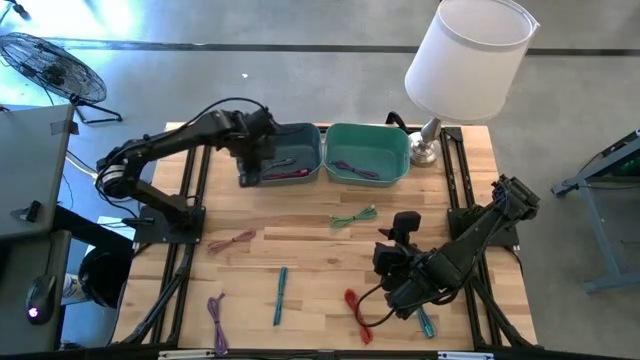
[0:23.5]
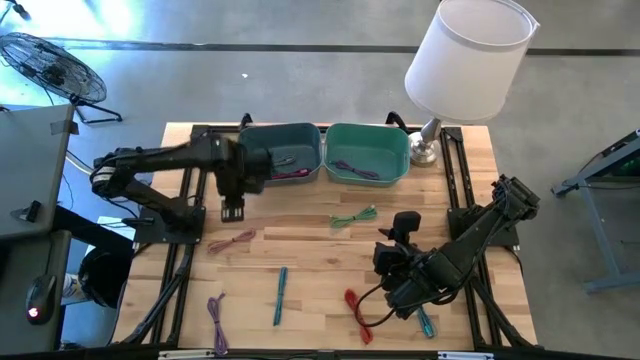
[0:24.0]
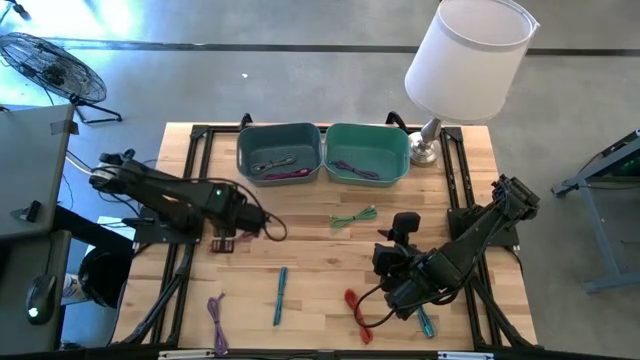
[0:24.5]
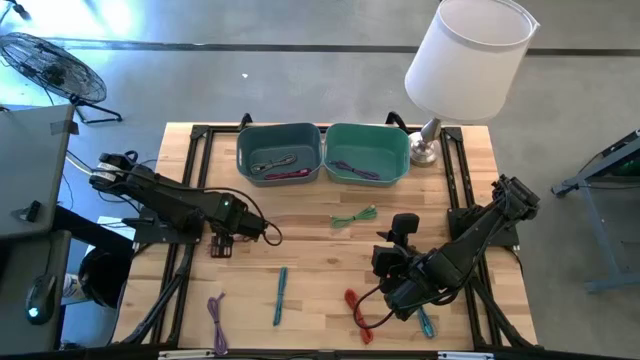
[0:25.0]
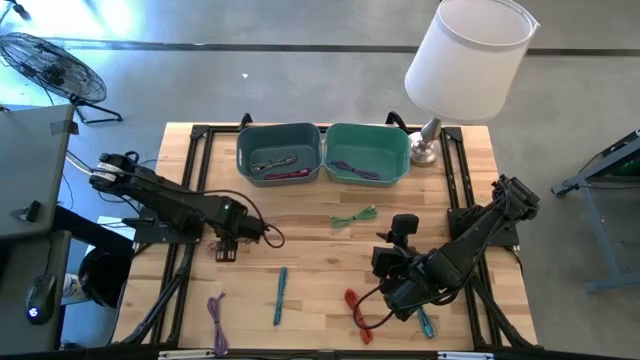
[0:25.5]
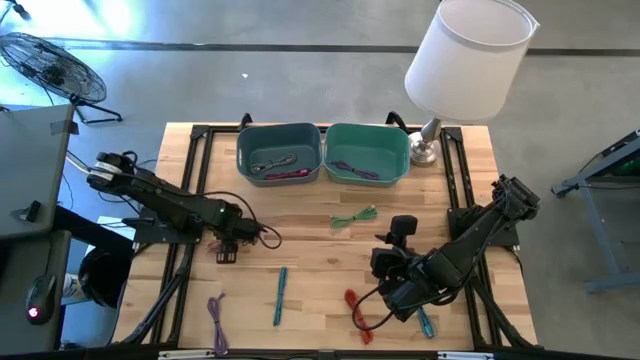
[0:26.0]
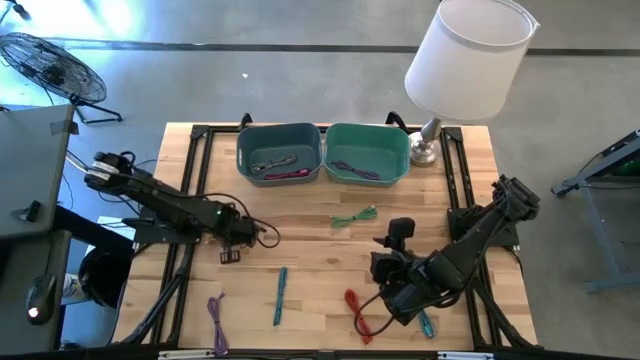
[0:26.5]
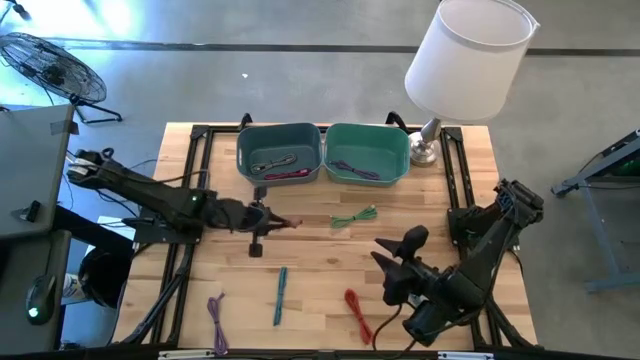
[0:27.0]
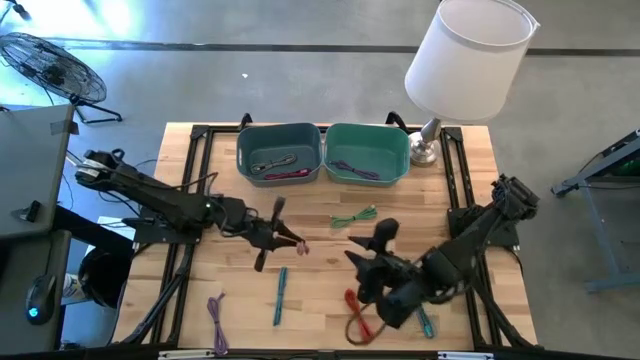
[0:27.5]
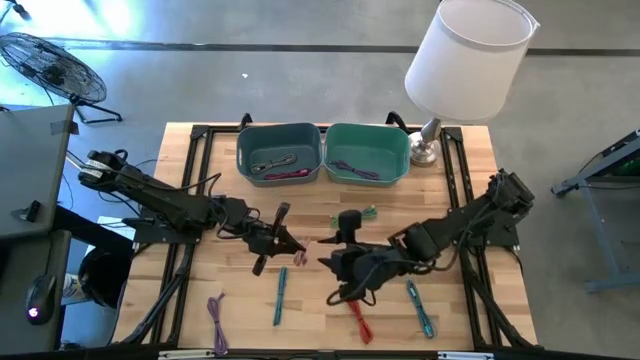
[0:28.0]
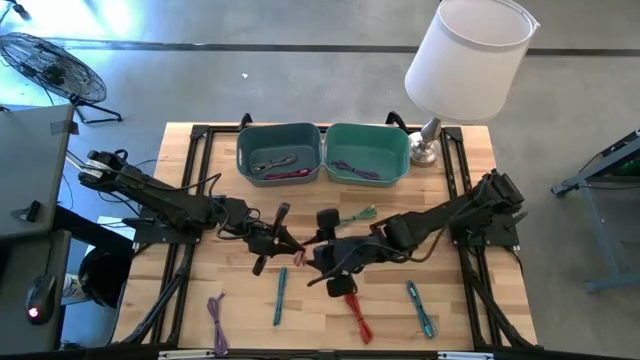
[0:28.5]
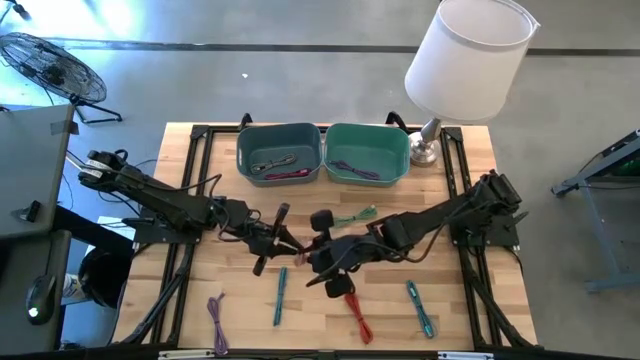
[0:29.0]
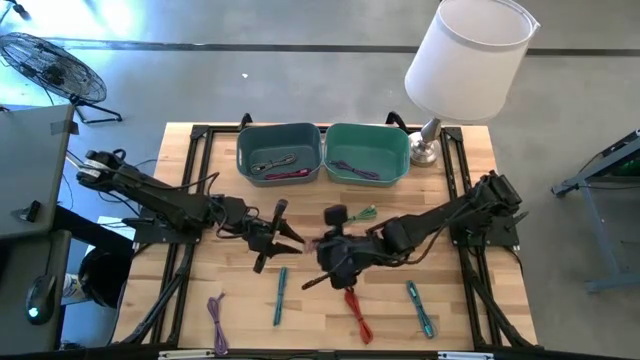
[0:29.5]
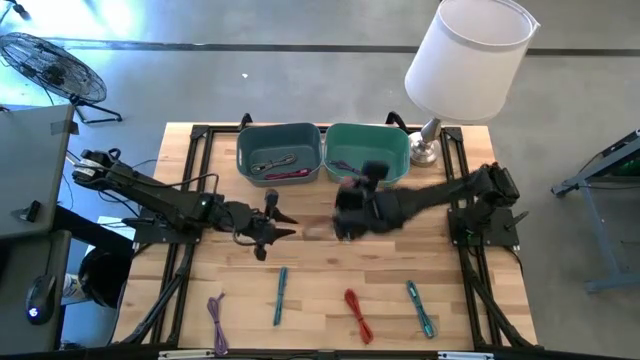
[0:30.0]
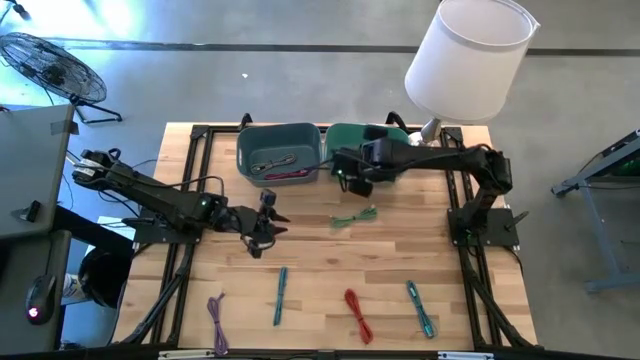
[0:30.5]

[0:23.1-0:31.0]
Task: Pick & Place USB Port
Put the pink USB cable into the green bin

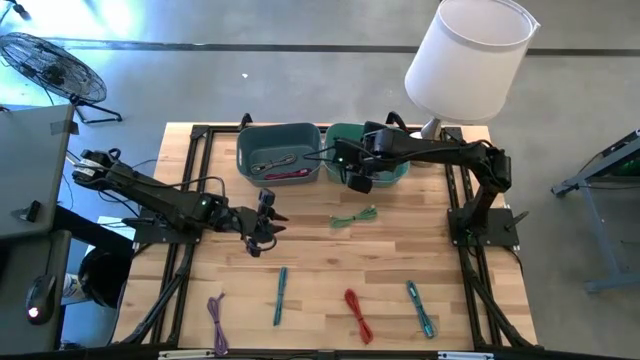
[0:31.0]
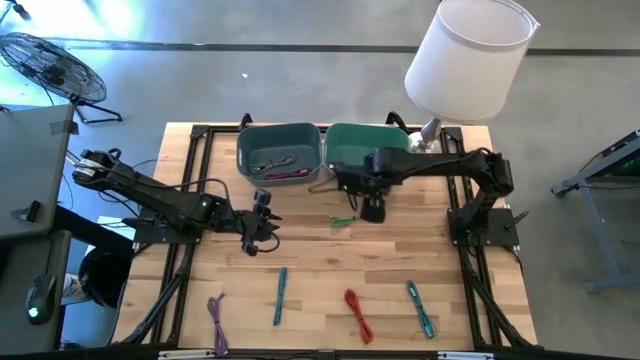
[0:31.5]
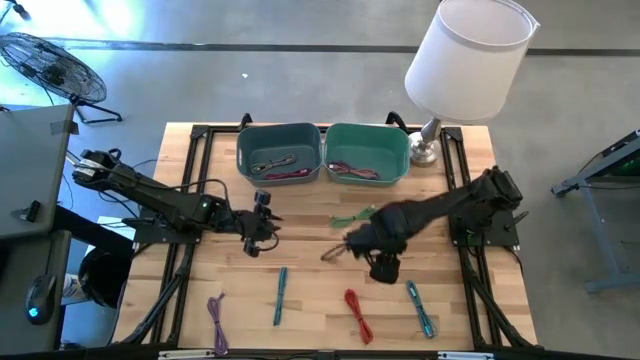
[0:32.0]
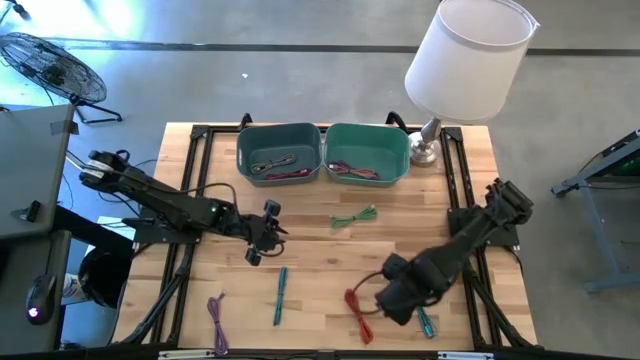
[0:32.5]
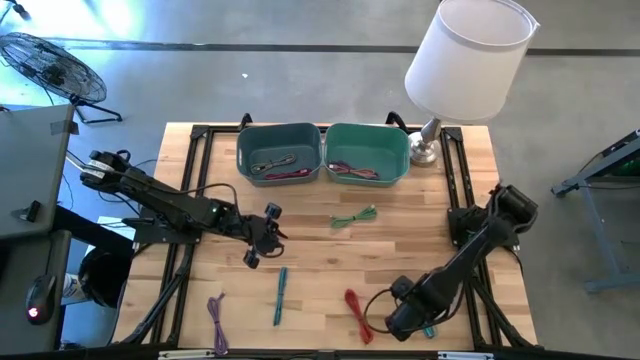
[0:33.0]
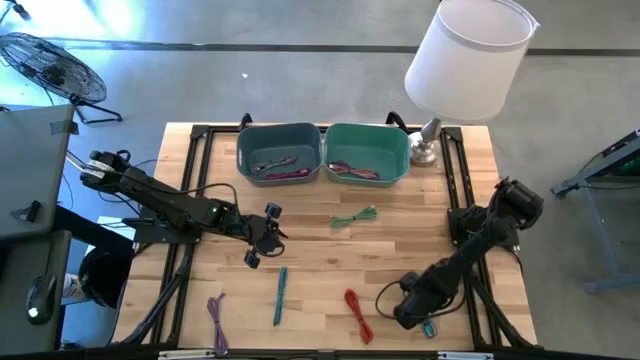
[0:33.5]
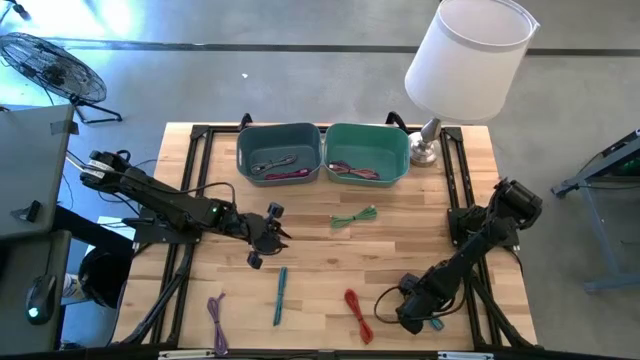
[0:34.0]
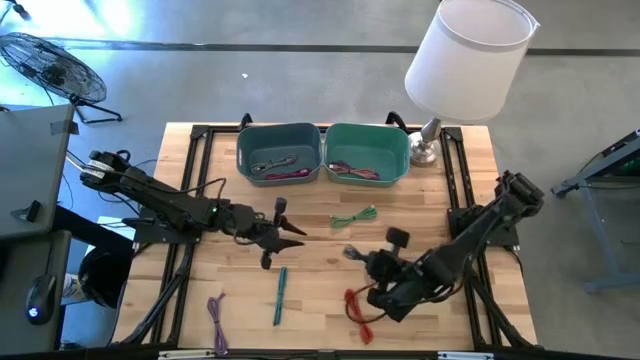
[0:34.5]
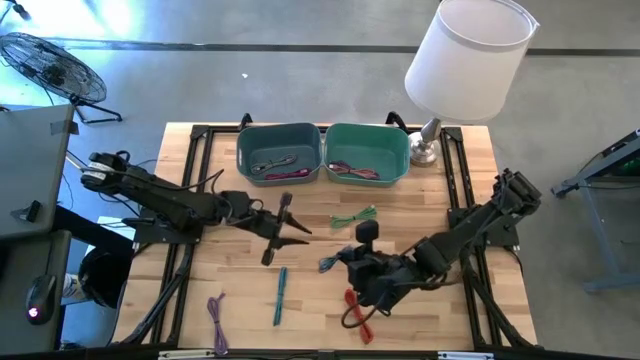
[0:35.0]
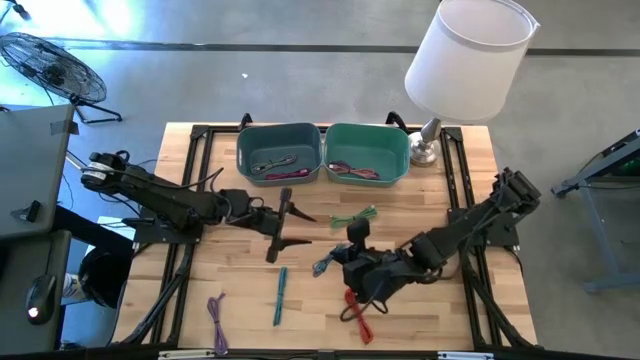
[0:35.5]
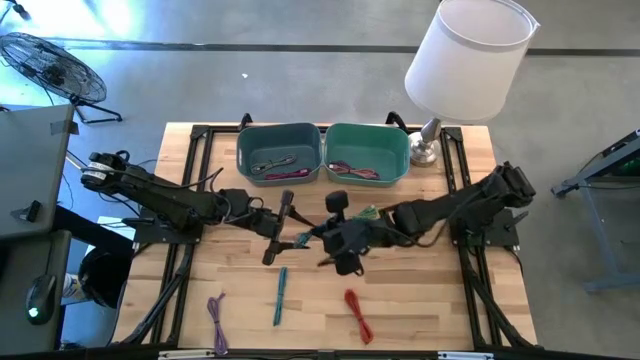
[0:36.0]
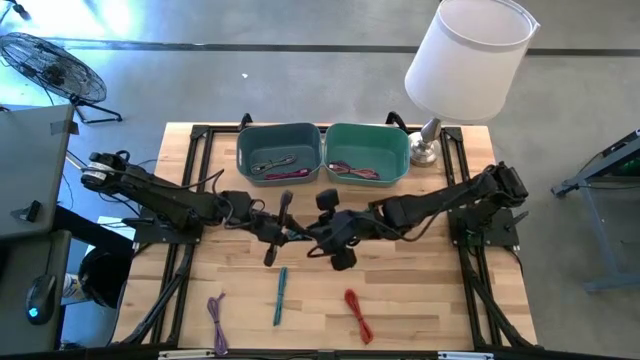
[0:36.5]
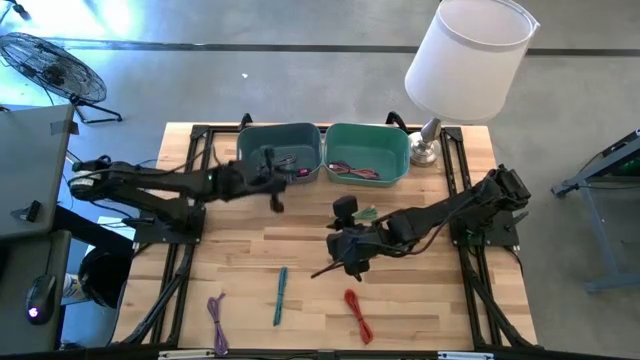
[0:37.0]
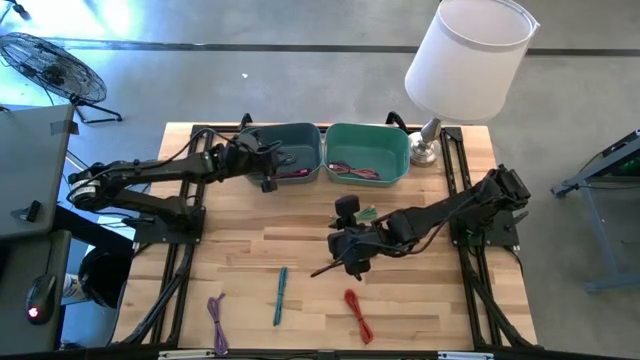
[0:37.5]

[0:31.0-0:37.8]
Put the right blue patterned USB cable into the blue bin

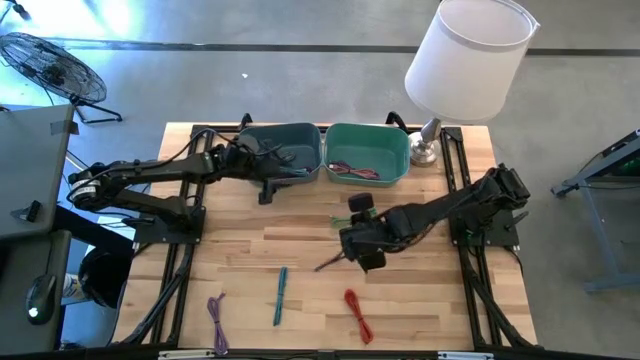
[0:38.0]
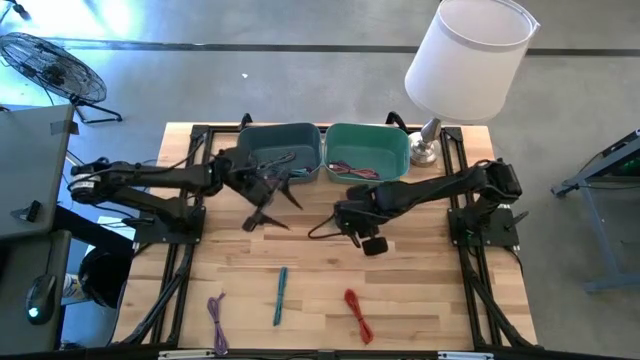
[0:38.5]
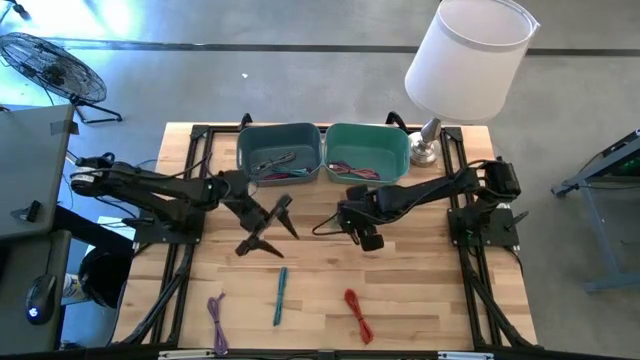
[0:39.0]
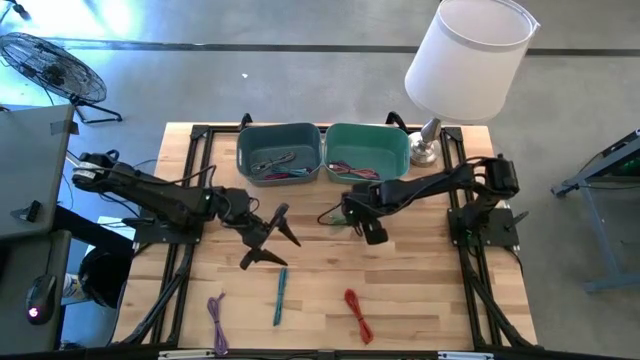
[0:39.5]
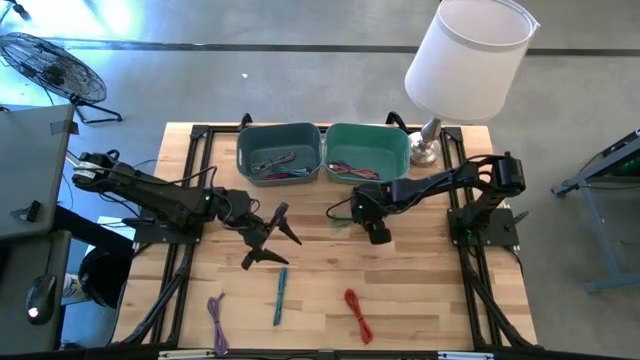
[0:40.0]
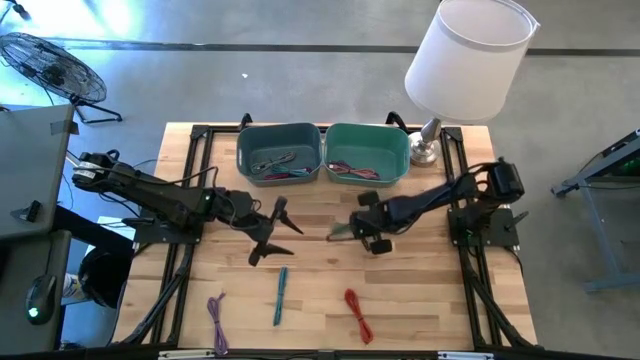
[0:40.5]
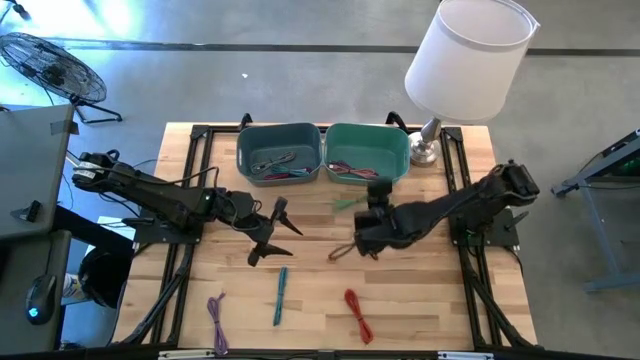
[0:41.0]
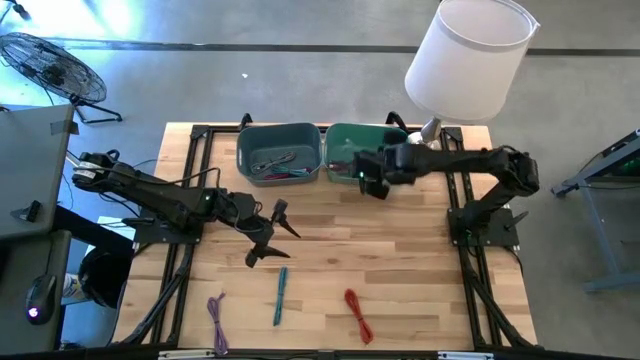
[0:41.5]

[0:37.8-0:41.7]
Put the green USB cable into the green bin

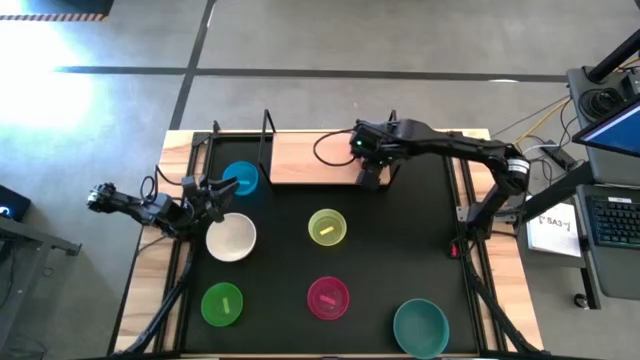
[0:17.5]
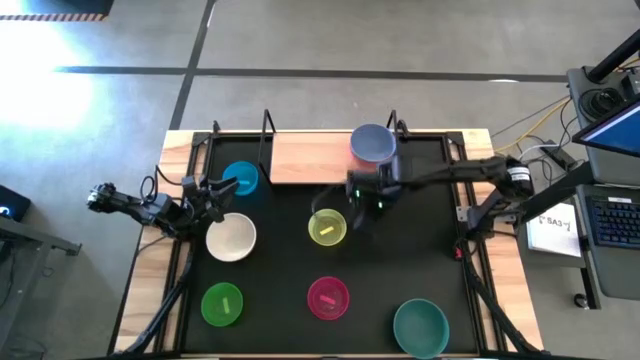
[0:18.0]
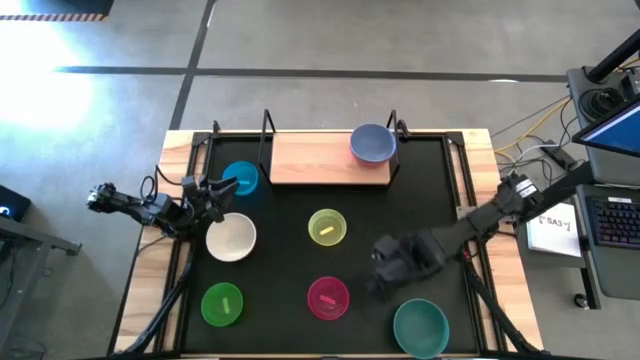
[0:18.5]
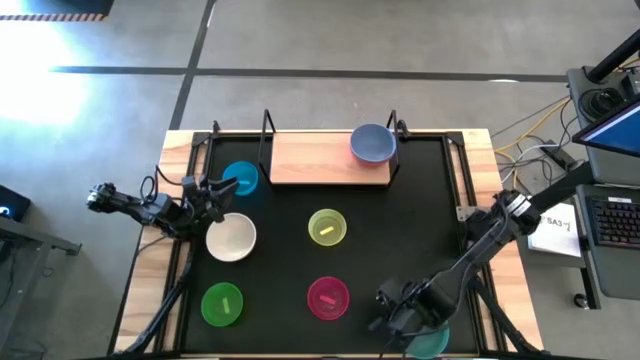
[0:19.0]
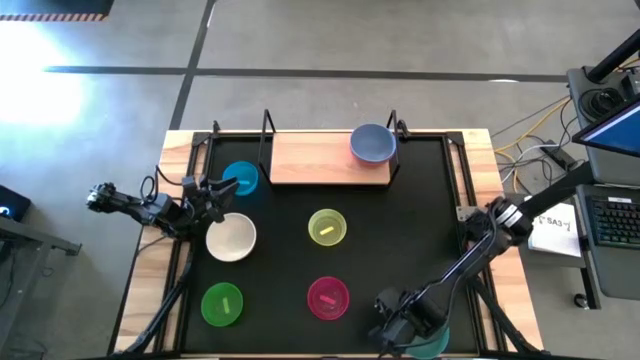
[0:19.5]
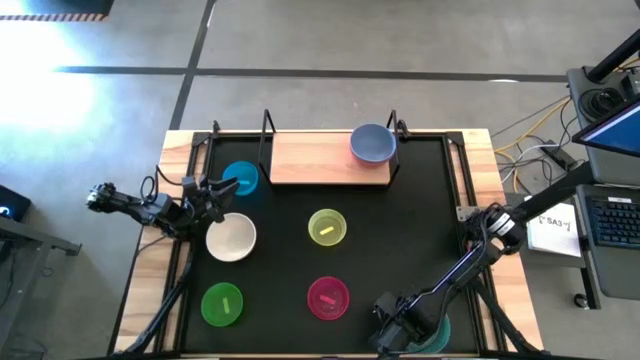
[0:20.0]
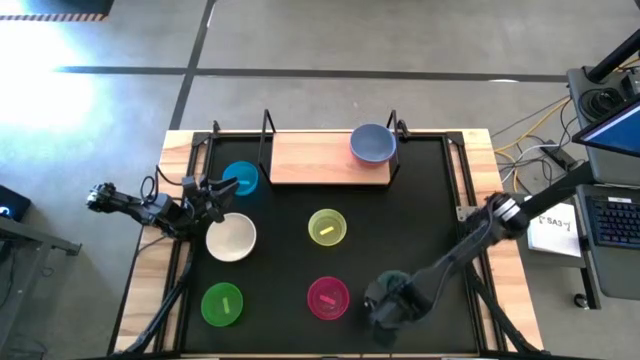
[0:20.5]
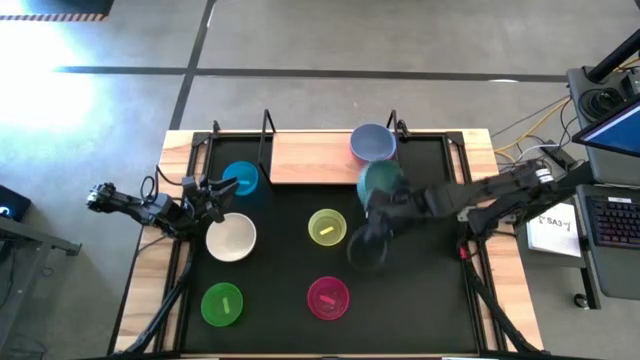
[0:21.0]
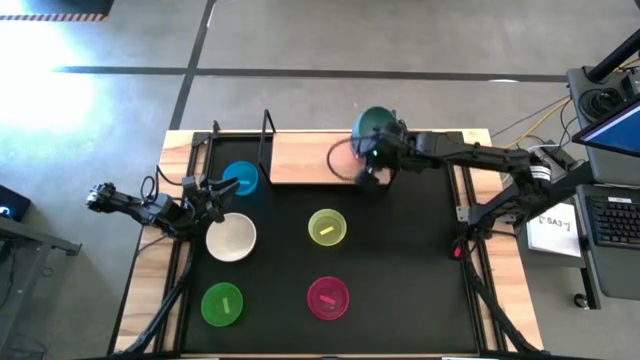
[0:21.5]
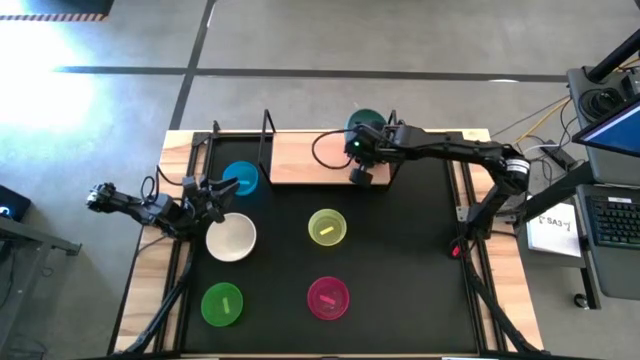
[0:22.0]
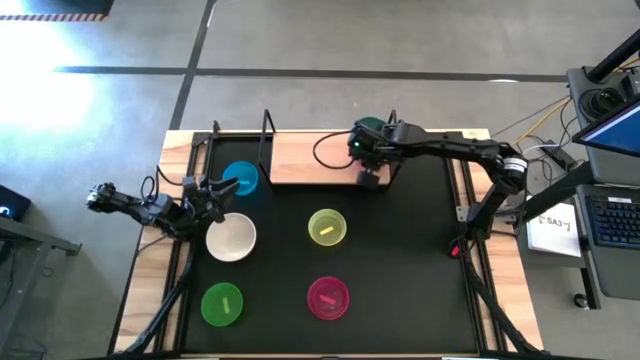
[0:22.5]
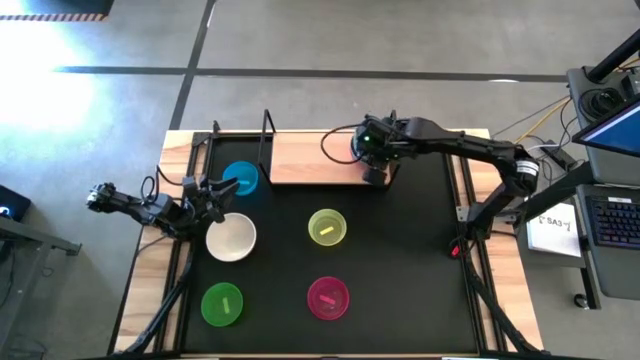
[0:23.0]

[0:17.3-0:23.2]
Task: Place and stack bowls onto a shelf
Stack the pine green bowl on top of the light blue bowl
